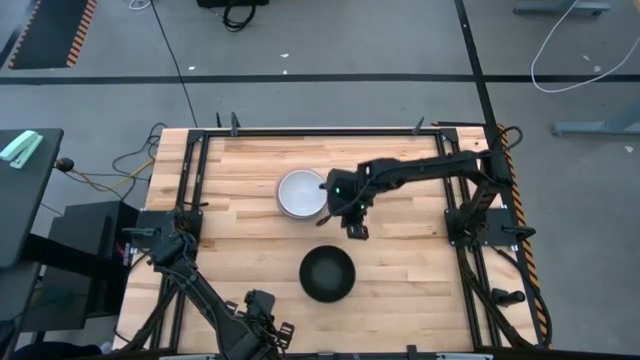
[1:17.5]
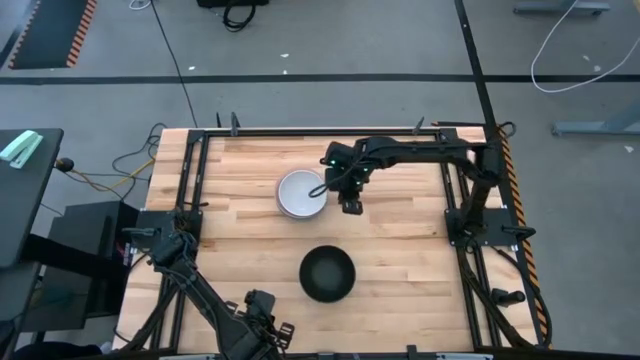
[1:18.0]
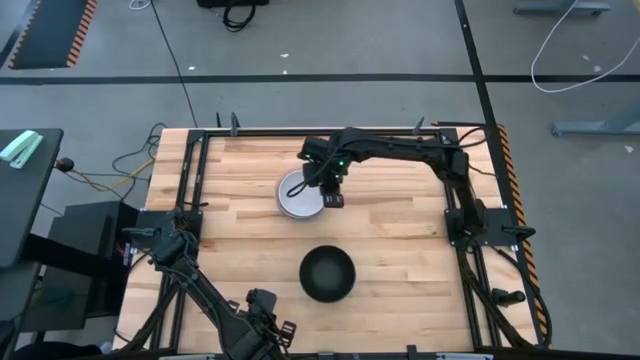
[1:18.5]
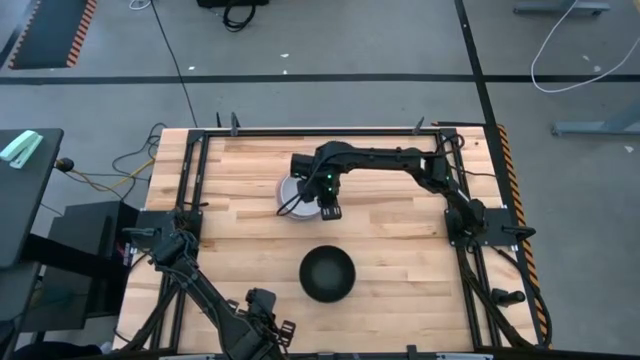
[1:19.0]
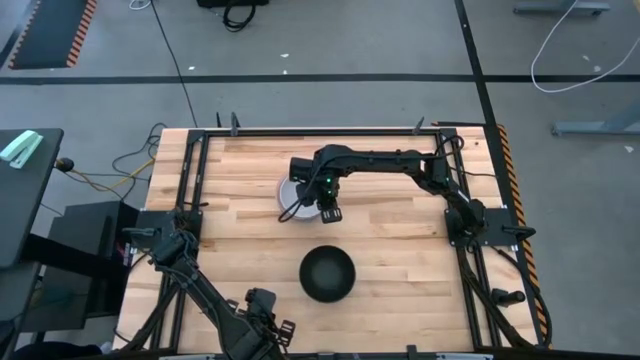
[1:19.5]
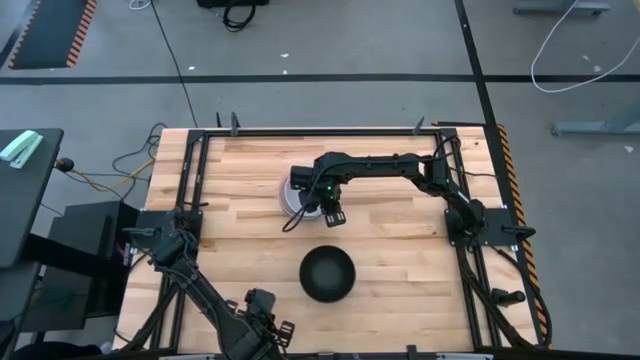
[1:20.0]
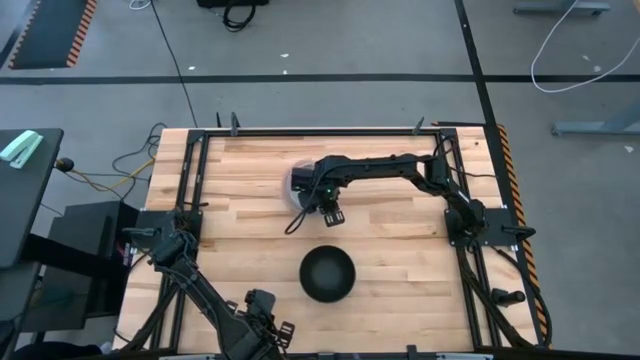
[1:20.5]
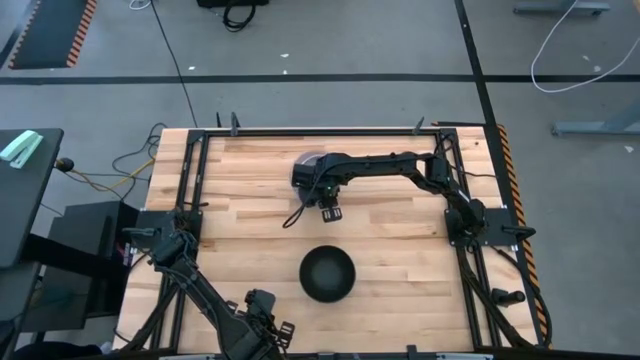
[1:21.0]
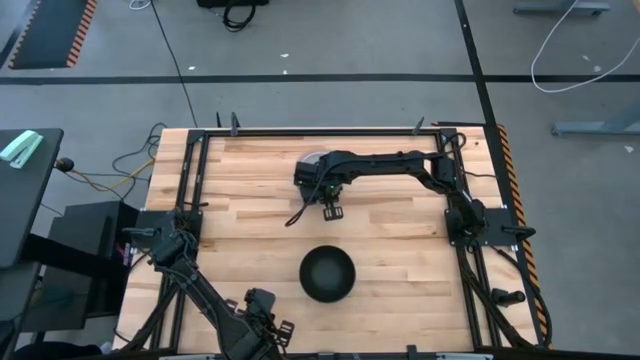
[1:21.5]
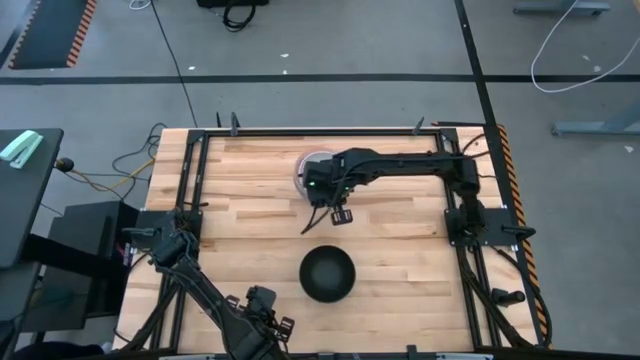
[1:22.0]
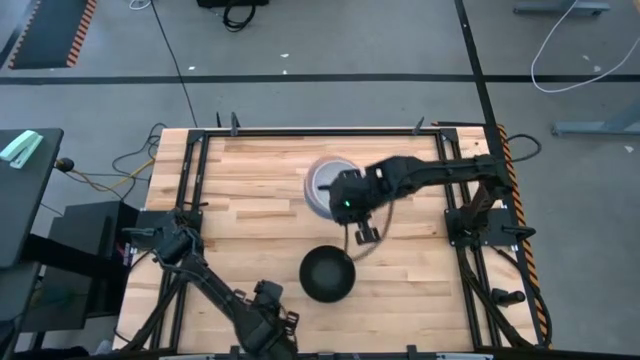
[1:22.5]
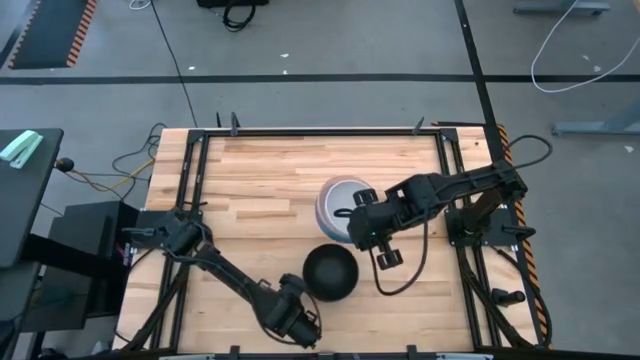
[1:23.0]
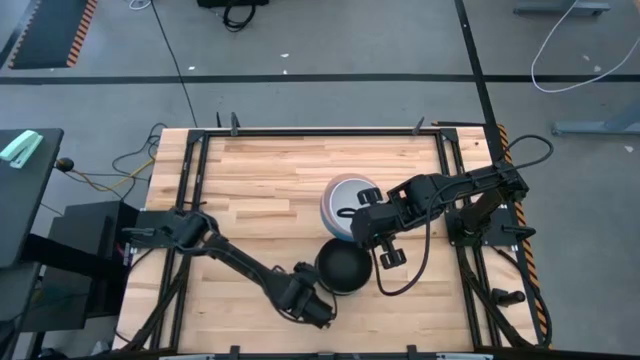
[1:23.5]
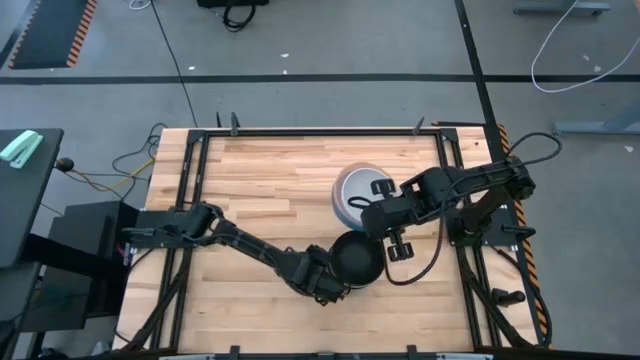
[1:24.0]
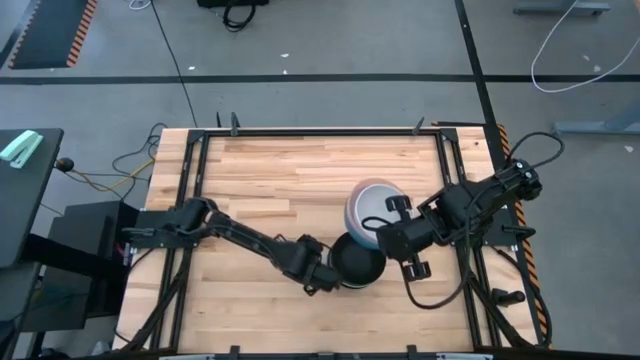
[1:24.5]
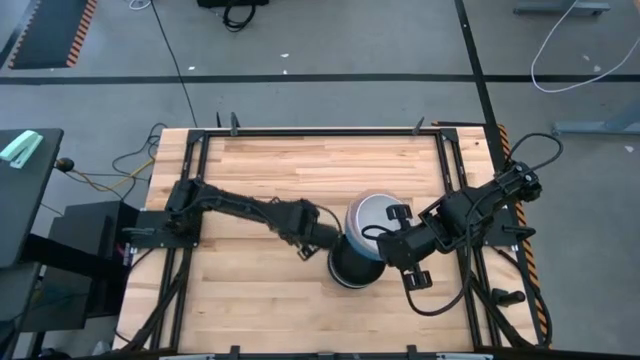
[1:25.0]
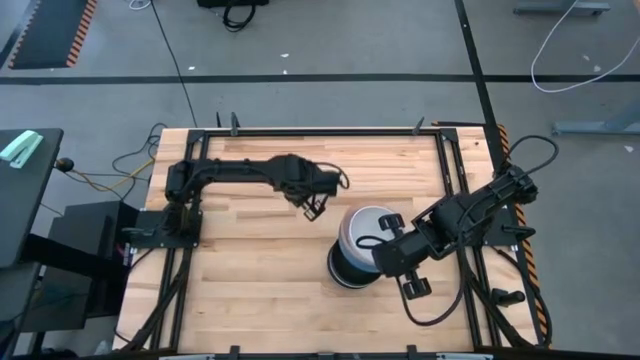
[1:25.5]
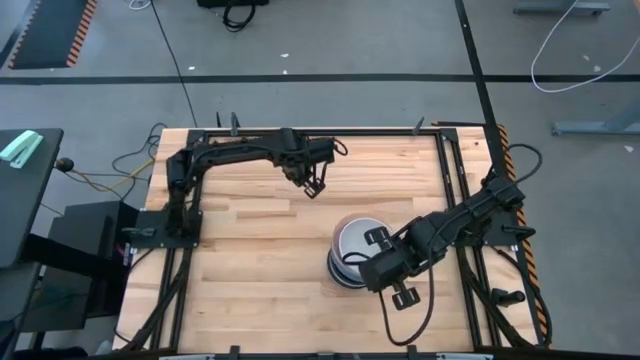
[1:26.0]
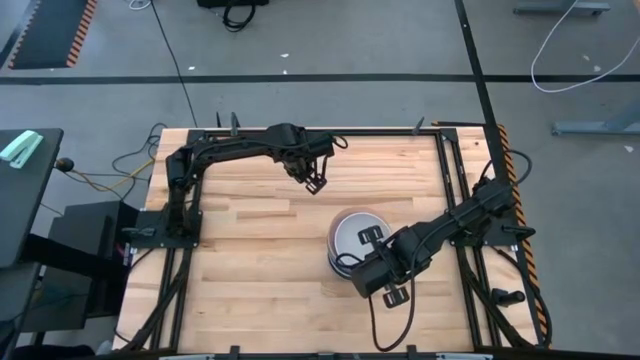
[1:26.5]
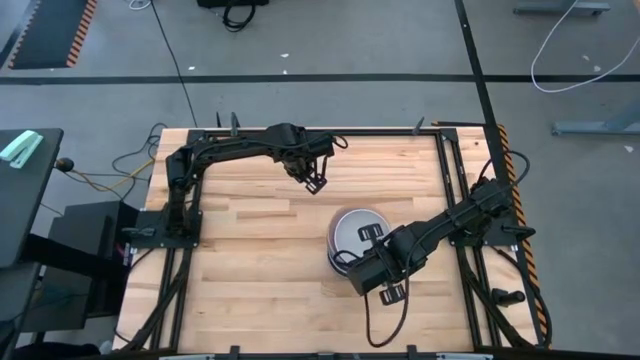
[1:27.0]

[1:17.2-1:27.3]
Task: Nest bowls inside each other
Stack the top stacked bowls on top of the black bowl

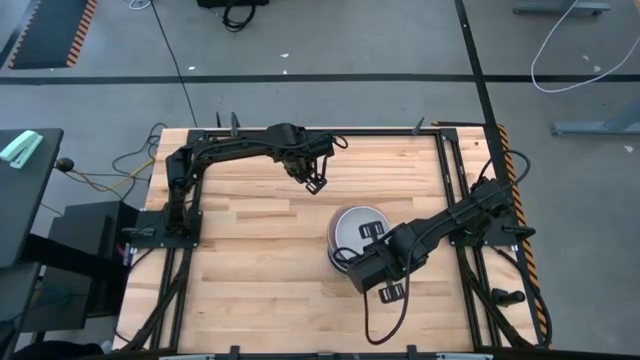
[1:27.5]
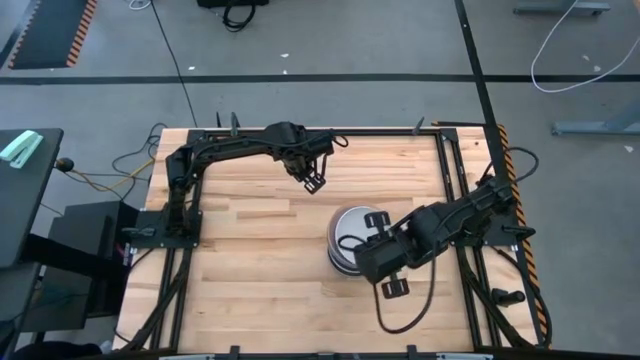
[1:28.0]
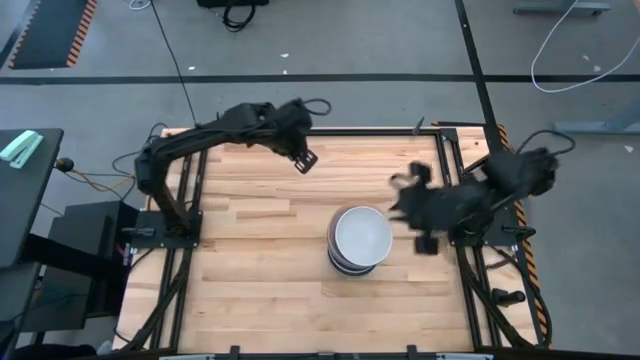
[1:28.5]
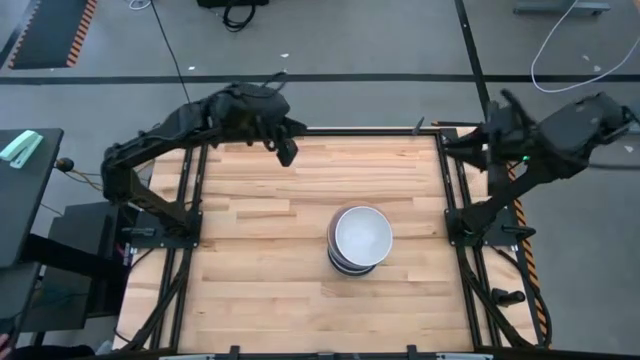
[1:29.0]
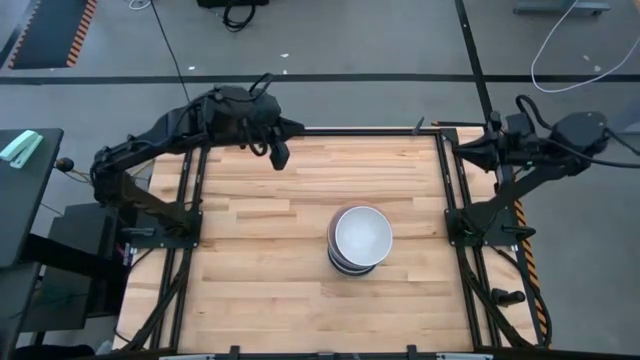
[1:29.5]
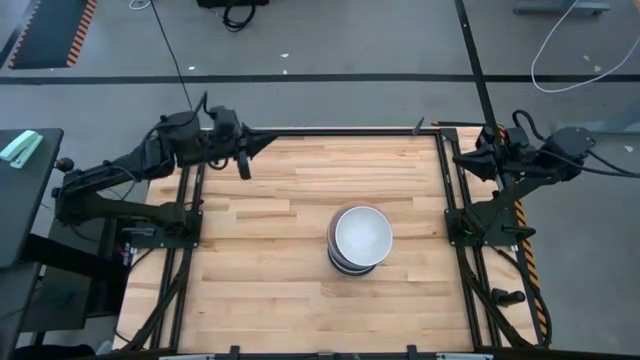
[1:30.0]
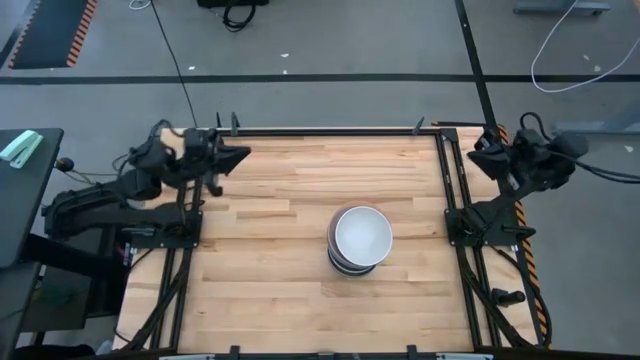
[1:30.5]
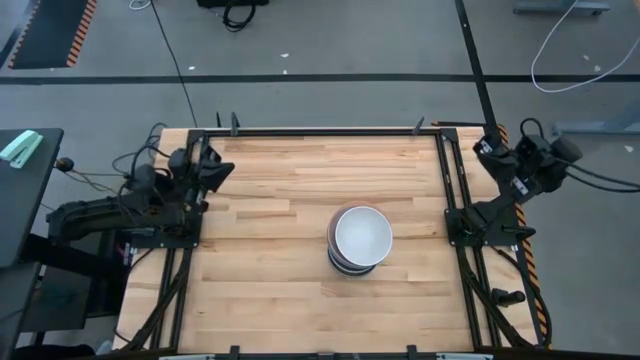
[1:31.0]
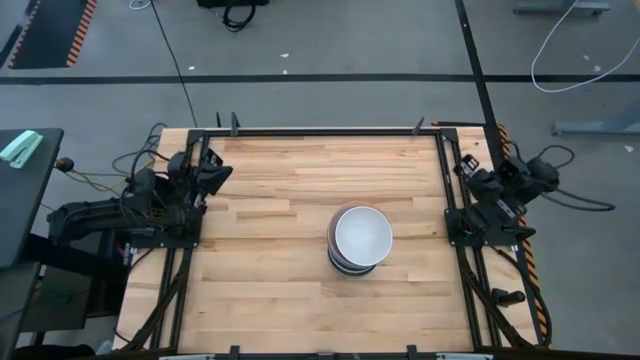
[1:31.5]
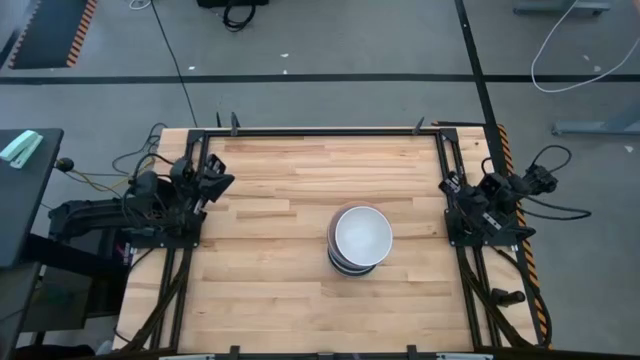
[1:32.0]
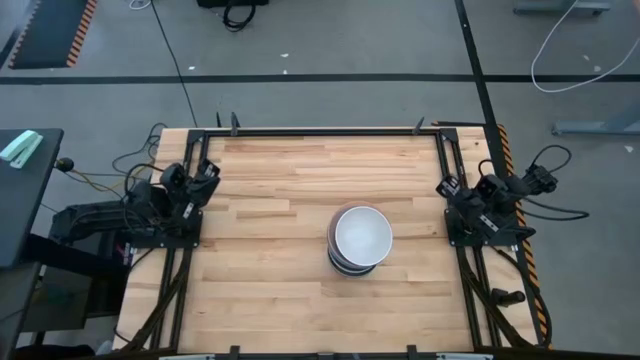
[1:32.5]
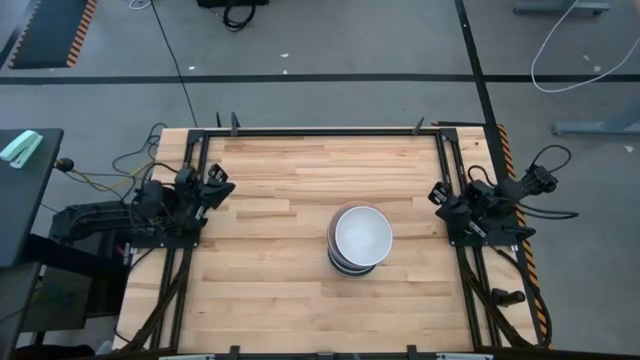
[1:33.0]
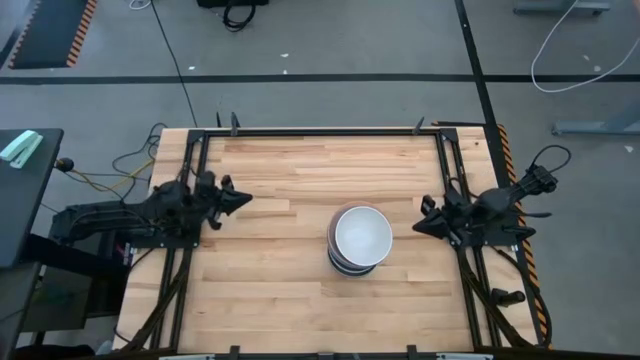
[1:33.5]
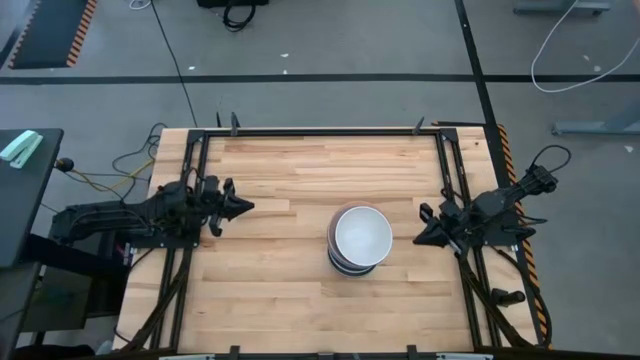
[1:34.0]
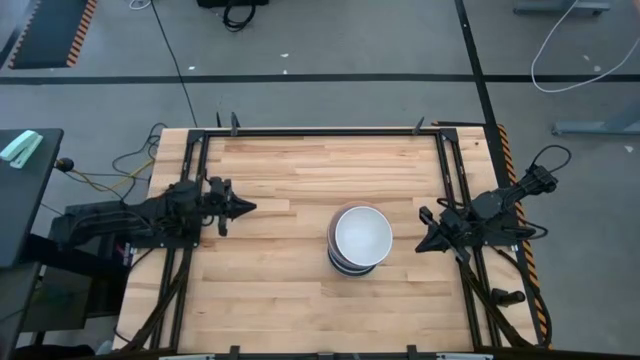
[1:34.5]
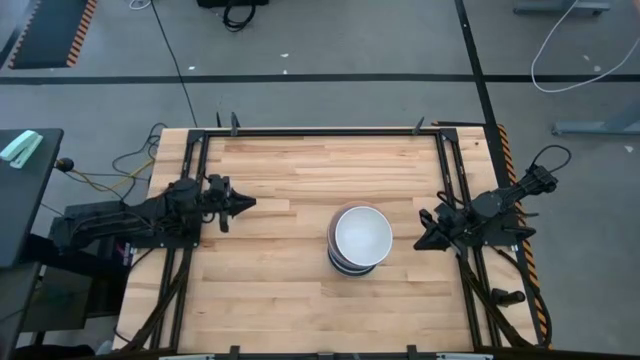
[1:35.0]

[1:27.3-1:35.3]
Return to Home Position

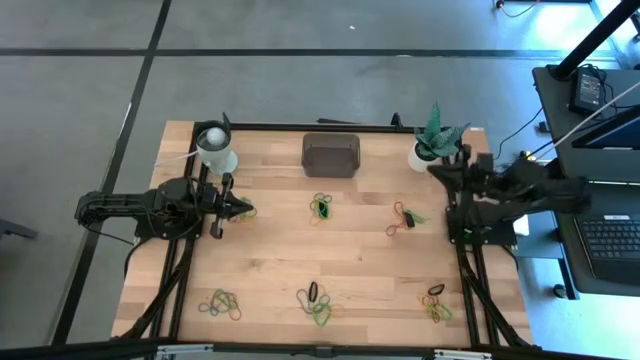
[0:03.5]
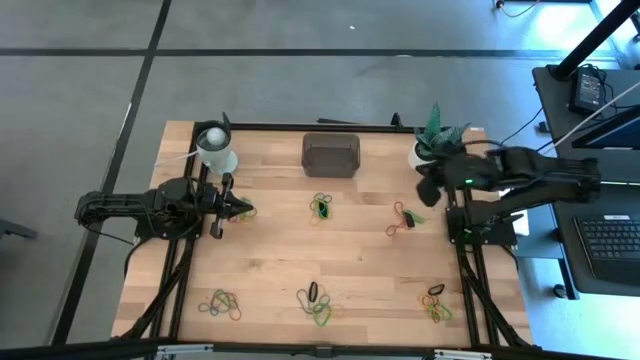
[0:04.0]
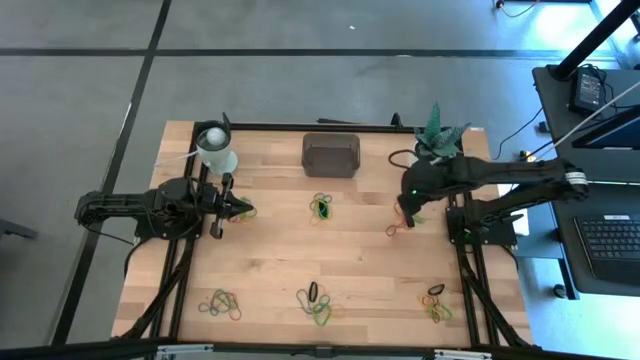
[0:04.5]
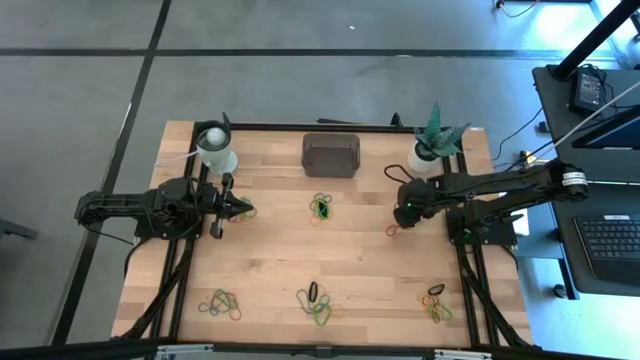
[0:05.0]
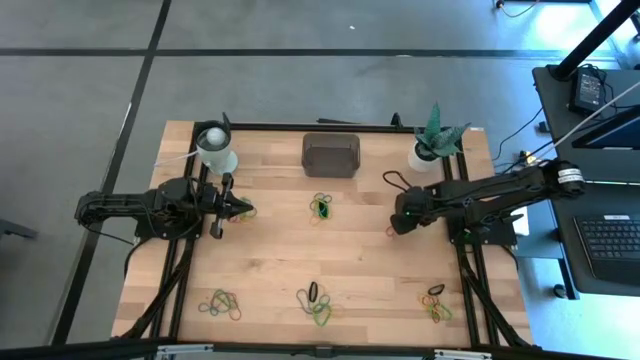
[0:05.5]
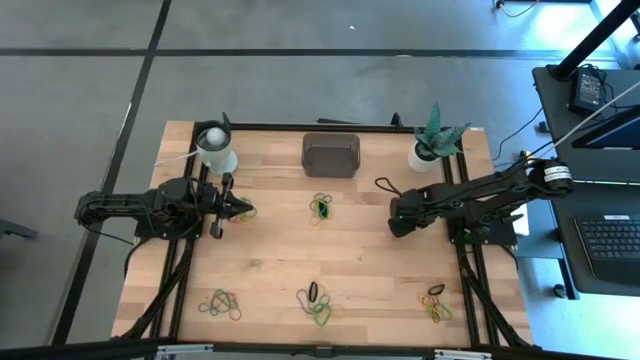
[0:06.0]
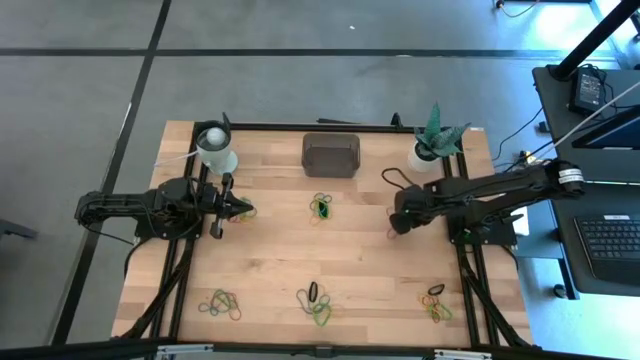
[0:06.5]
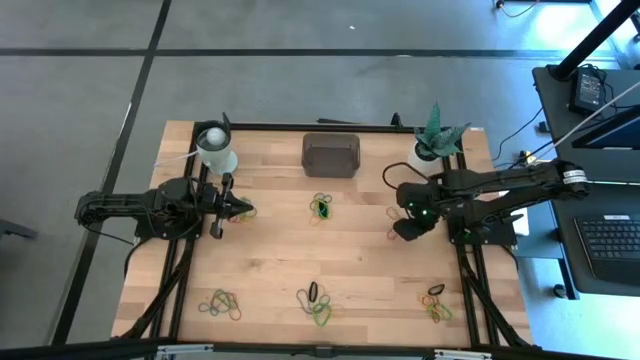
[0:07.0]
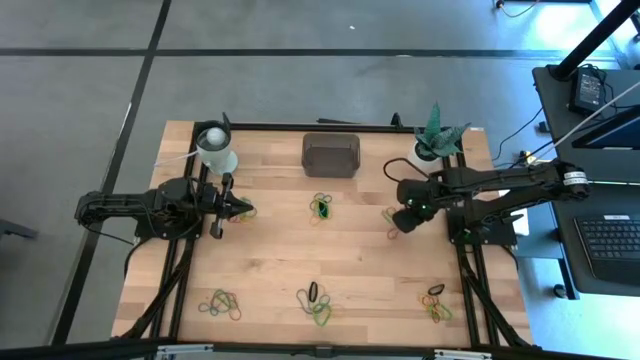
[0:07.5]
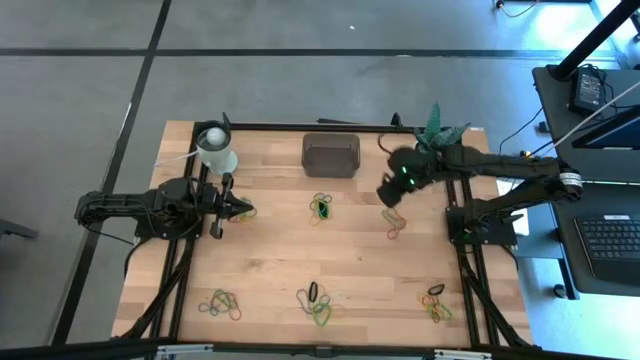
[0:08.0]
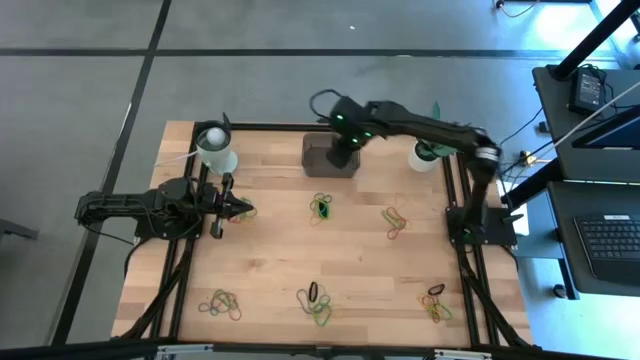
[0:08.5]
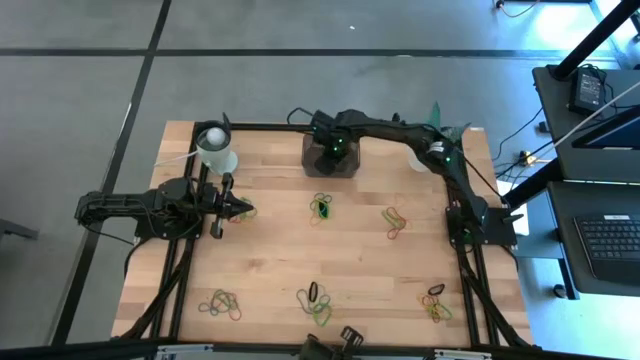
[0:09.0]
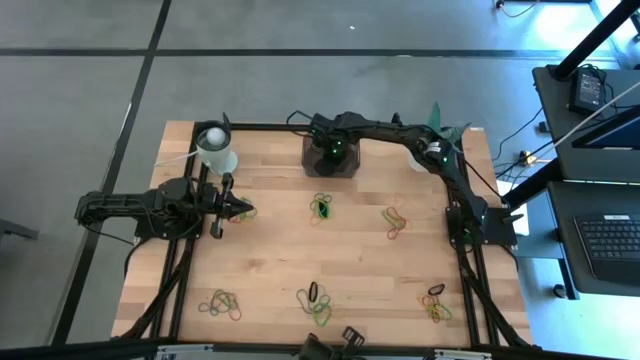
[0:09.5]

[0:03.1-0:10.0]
Task: Pick and place rubber bands into bin
Put the black rubber band into the bin
